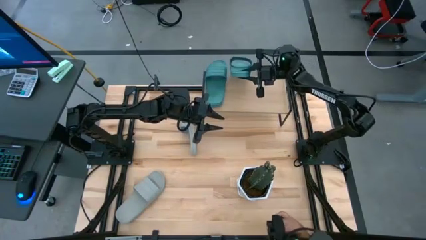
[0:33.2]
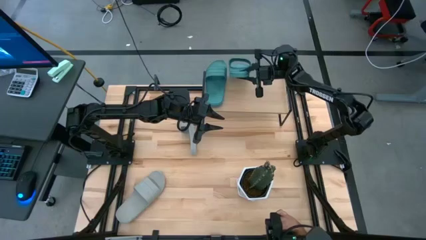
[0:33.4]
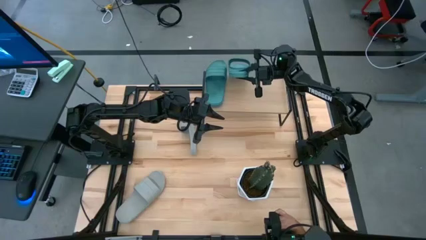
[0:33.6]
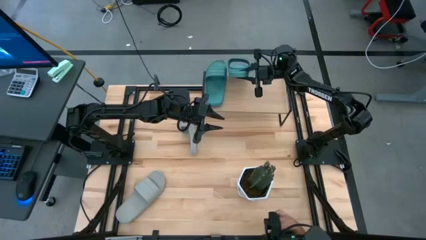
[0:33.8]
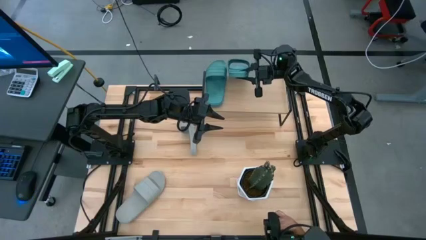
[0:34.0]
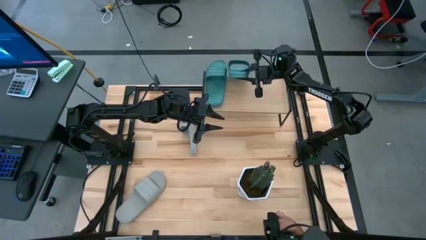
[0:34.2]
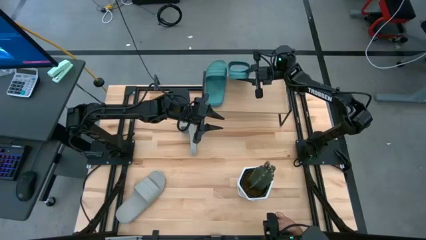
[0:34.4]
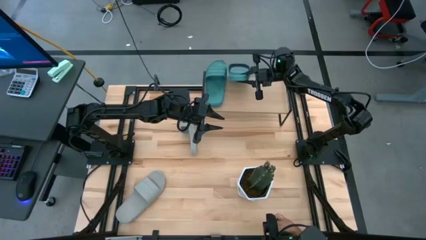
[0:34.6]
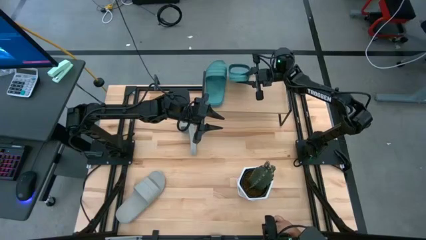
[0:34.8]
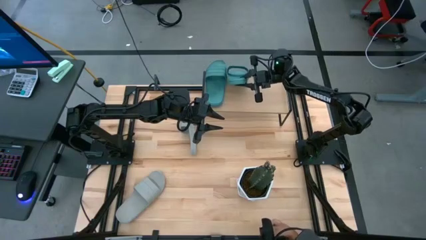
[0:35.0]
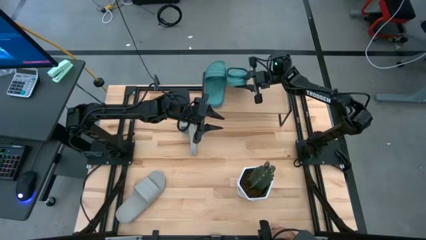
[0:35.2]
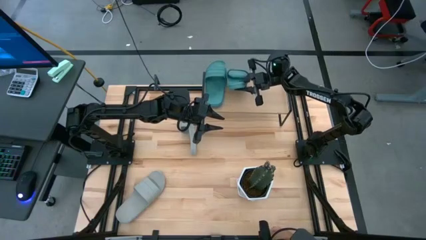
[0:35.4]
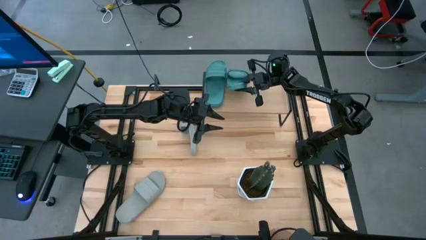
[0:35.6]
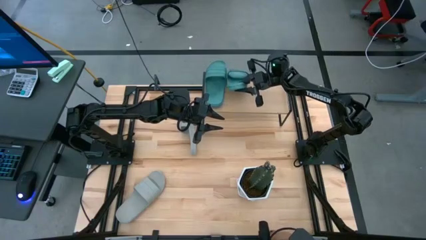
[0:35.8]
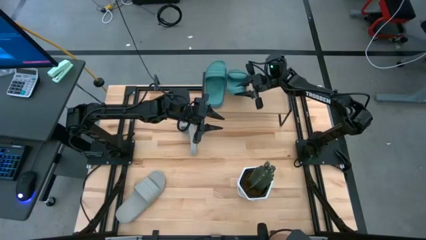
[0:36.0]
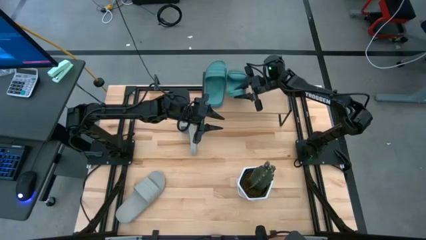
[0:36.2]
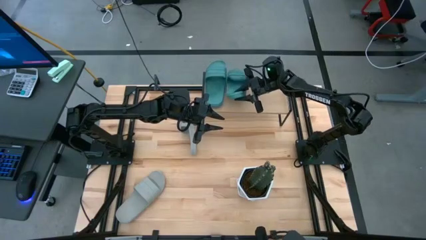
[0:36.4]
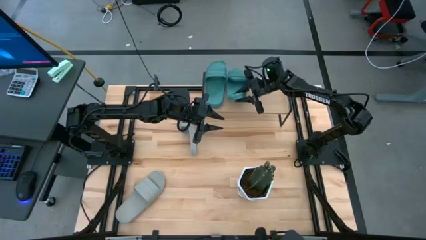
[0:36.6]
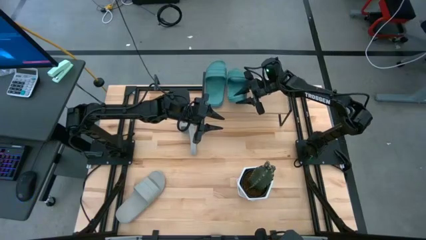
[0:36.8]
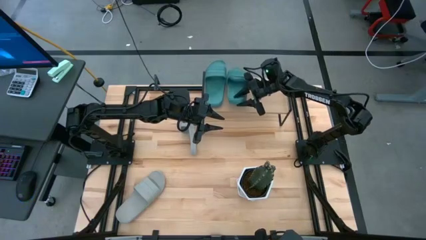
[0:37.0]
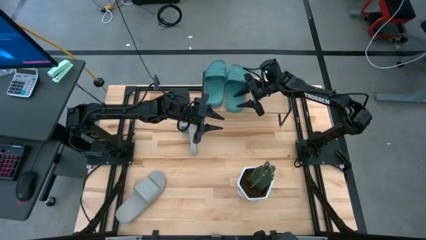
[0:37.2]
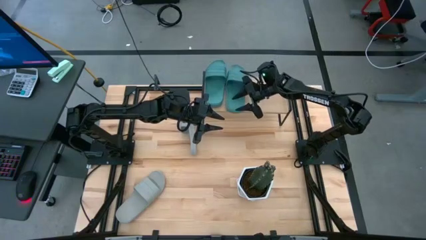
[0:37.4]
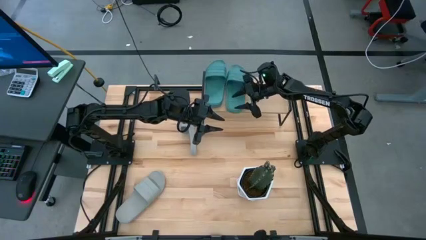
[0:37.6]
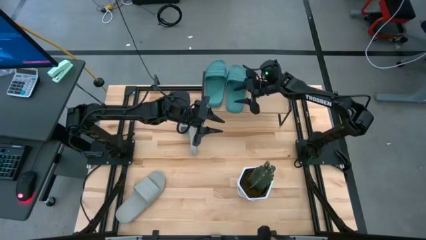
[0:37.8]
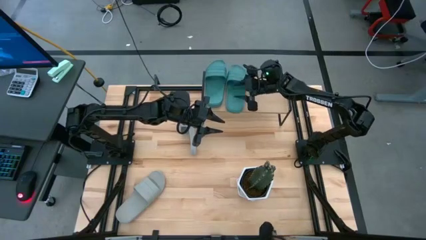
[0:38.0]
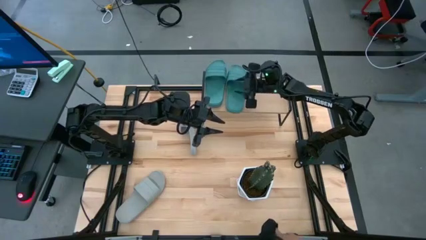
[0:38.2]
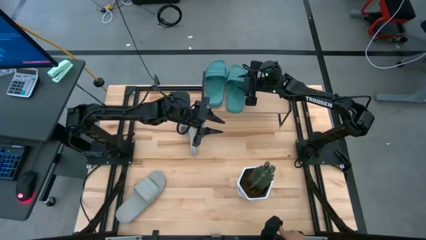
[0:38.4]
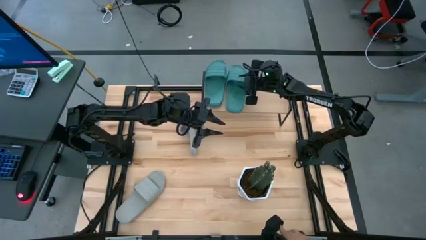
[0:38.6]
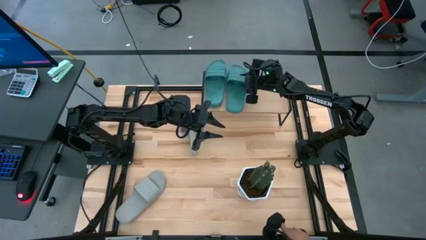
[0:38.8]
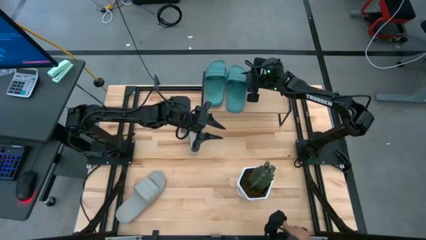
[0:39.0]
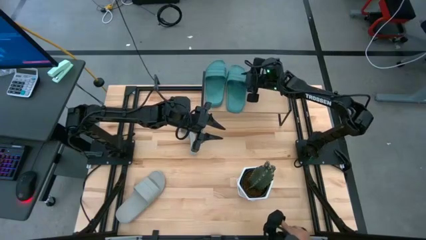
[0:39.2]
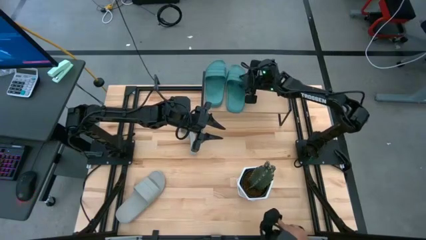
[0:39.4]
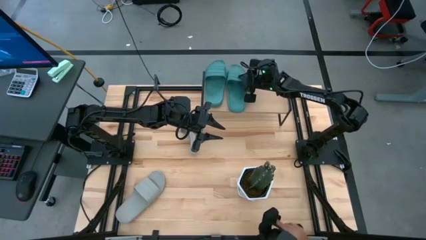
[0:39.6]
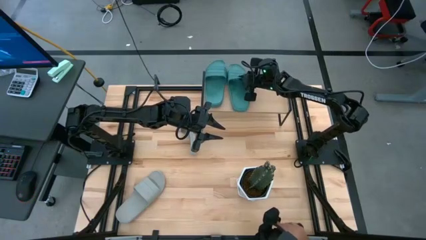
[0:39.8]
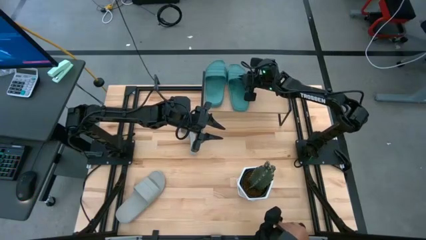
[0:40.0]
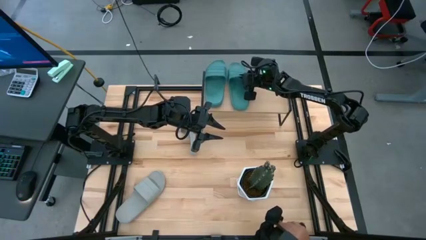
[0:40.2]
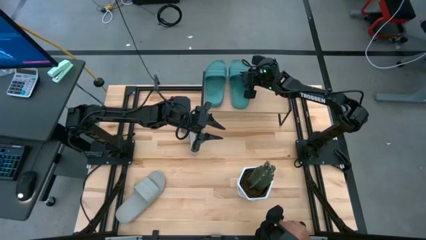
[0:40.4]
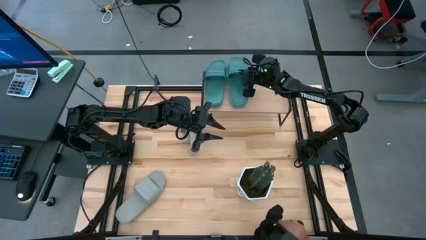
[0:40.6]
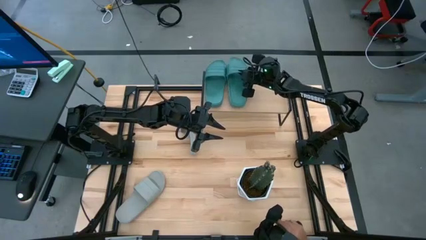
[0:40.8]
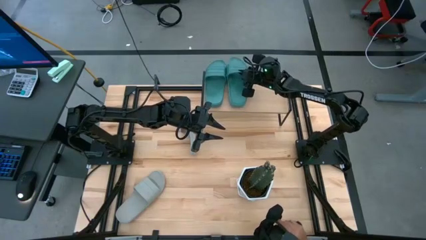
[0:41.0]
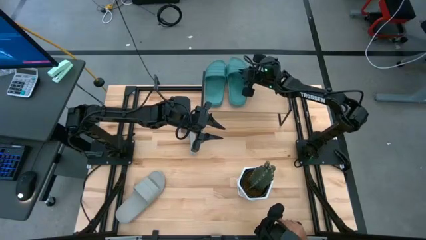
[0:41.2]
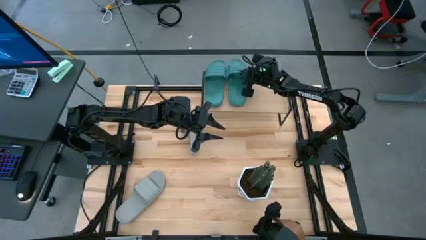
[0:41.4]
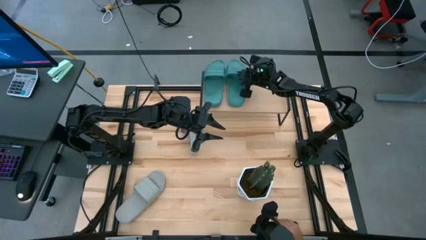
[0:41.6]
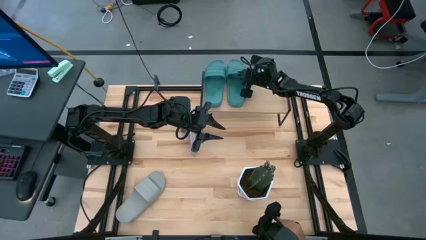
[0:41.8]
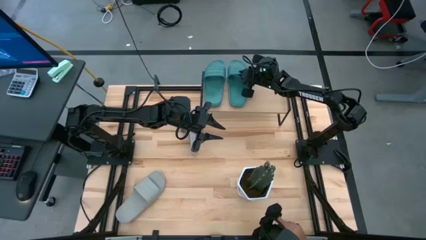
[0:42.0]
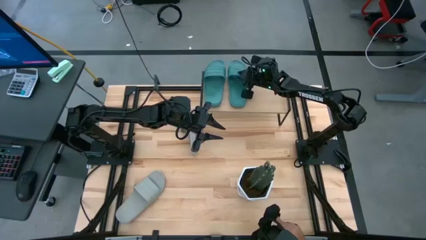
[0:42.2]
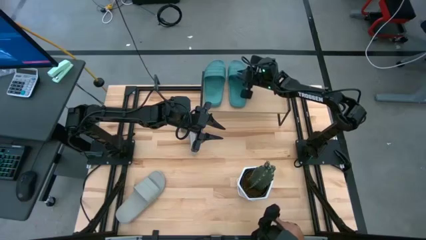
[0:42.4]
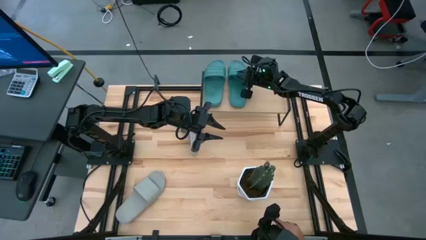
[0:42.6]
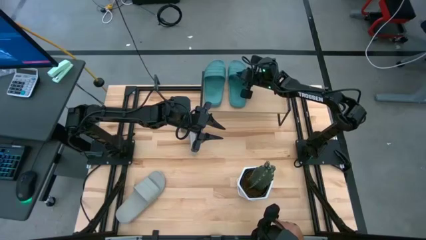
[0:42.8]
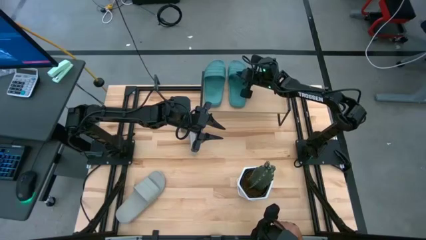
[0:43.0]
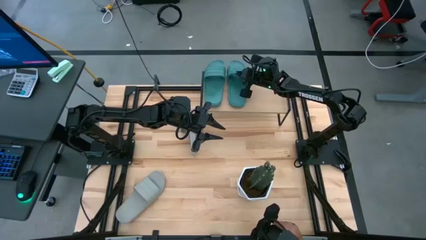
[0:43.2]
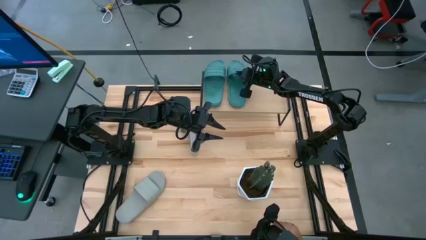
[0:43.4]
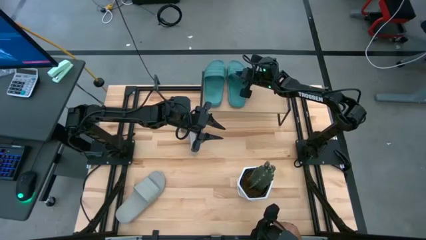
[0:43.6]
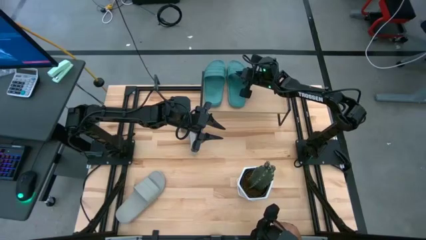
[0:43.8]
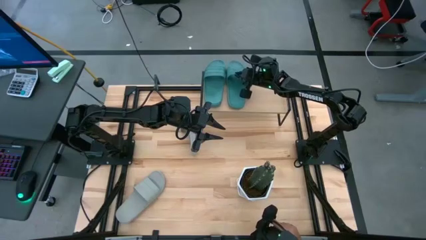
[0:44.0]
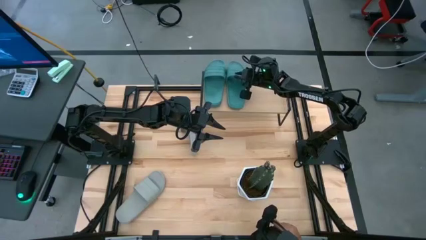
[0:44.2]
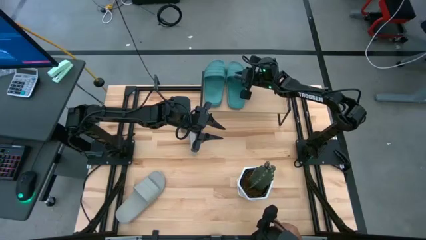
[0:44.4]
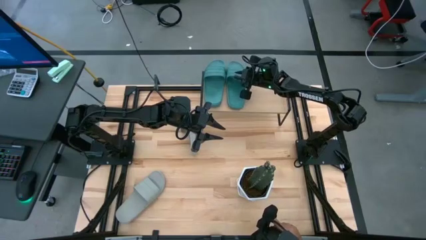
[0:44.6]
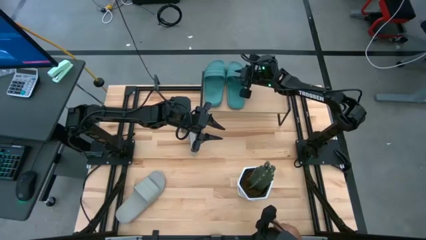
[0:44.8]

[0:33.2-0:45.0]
Task: Pick and place slides into the shelf
Put the green slides on the shelf

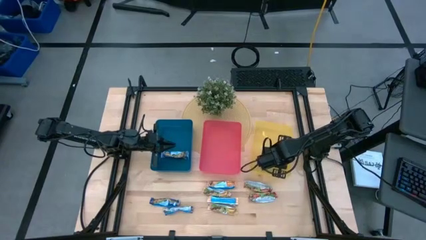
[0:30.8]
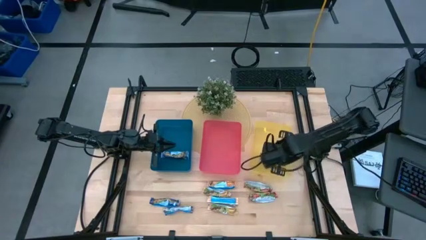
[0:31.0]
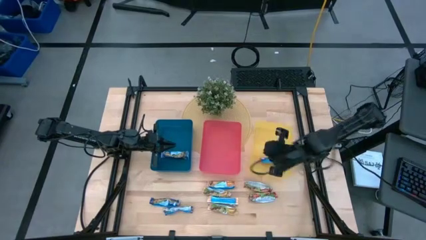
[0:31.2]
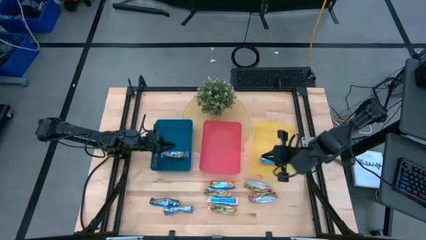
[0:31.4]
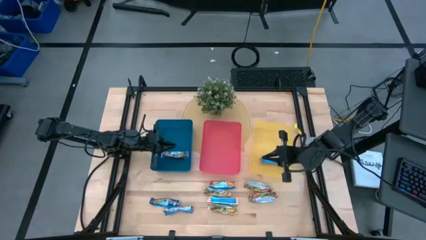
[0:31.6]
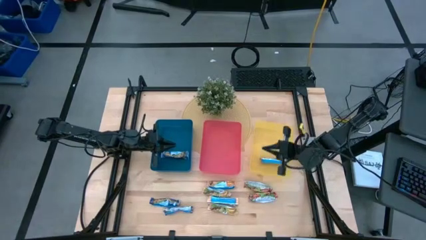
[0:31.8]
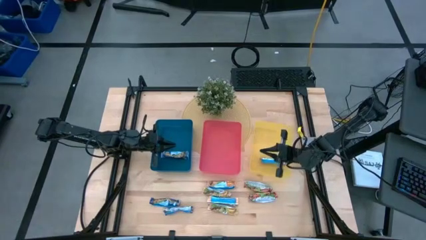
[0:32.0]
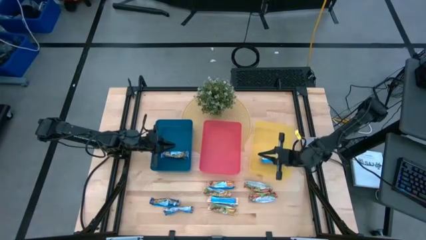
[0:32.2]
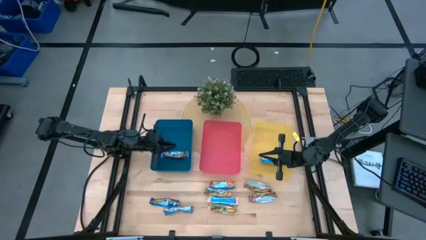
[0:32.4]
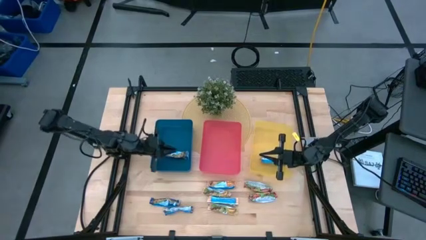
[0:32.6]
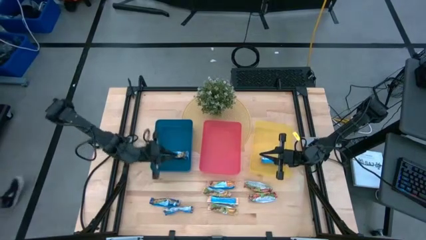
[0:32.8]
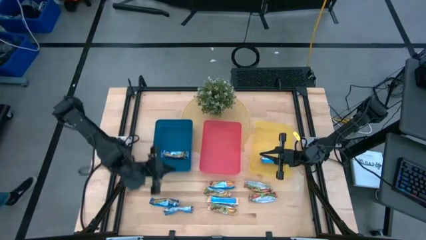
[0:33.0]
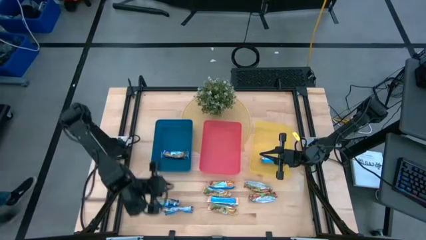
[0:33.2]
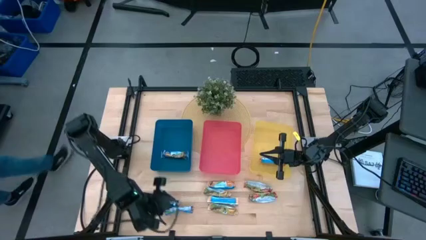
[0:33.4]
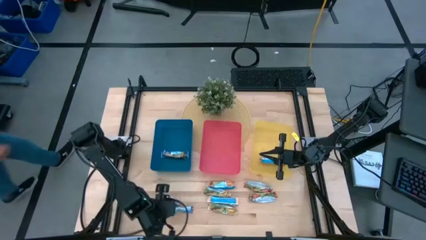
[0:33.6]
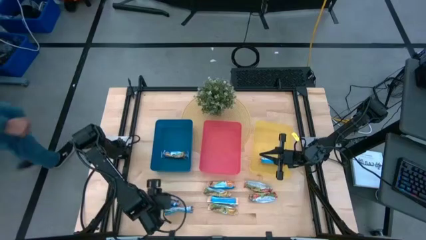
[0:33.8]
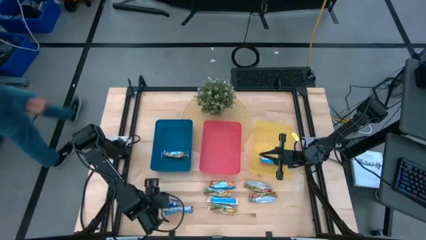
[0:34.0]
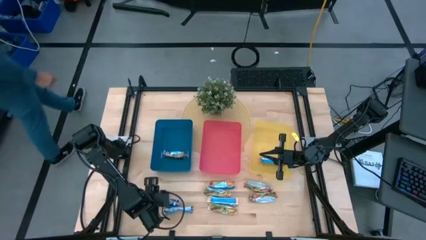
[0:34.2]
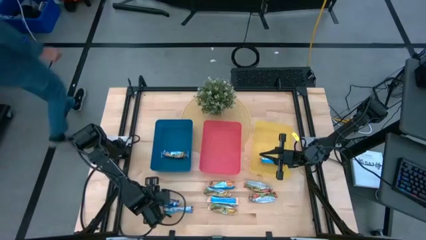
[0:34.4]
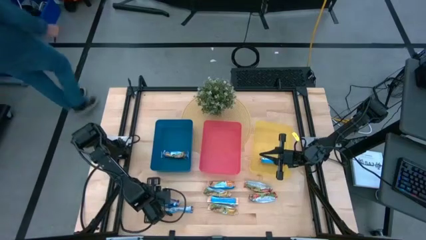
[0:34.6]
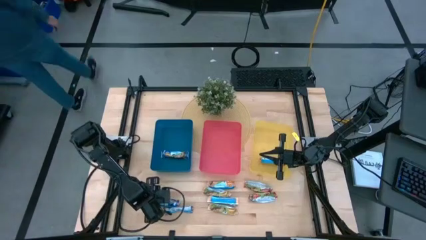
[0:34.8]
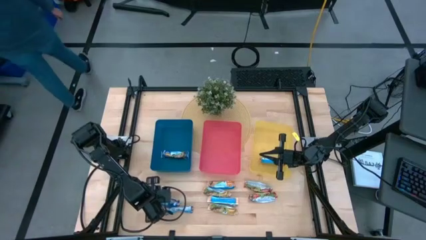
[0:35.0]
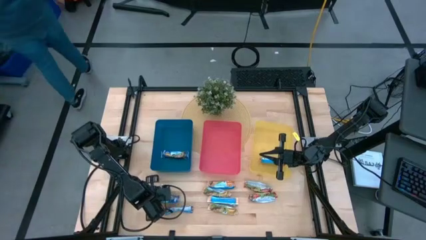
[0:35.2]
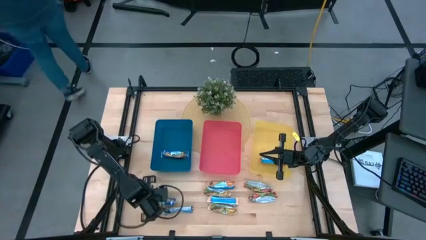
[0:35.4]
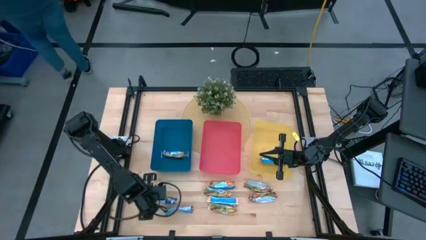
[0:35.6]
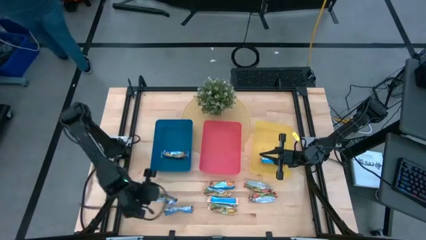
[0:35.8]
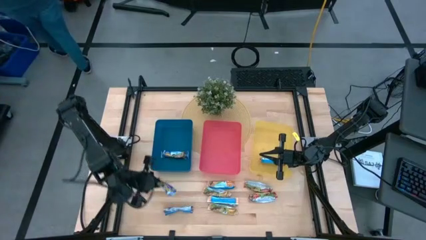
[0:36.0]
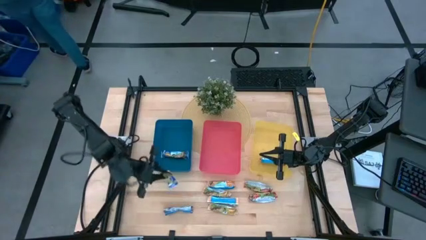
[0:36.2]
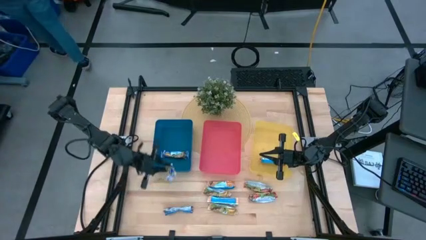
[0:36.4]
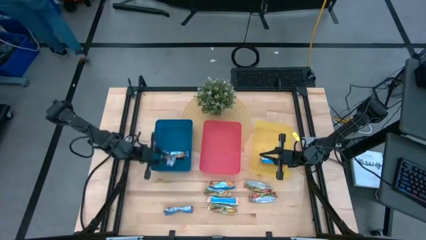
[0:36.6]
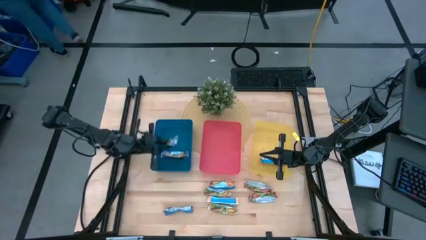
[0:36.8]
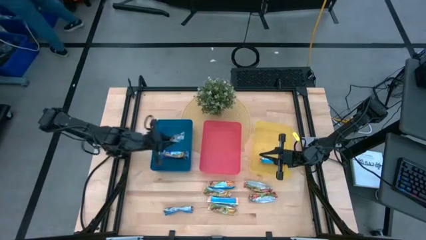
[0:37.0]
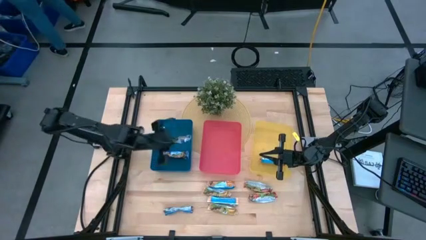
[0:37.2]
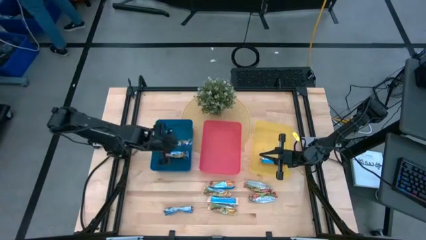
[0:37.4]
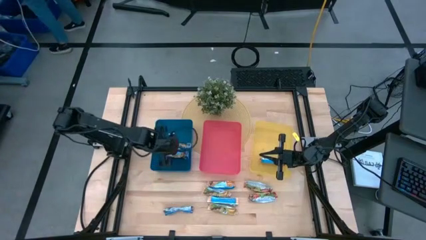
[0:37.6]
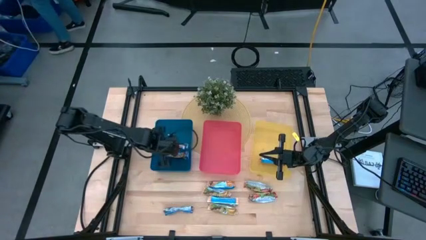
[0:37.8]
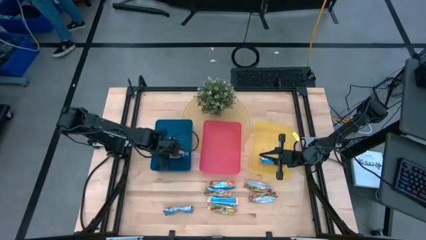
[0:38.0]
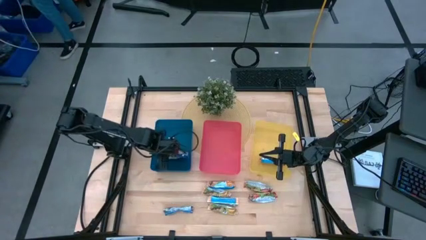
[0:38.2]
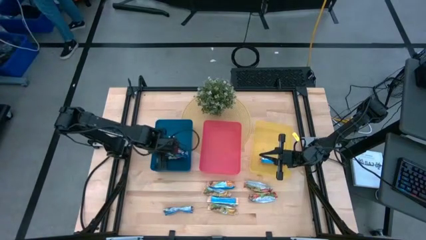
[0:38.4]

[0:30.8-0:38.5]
Task: Pick and place Granola Bars by type
Put the top blue granola bar into the blue bin
